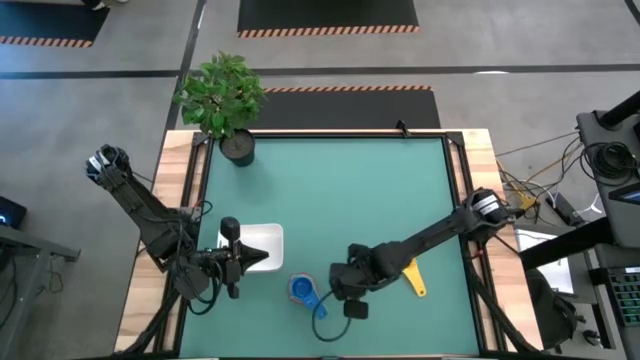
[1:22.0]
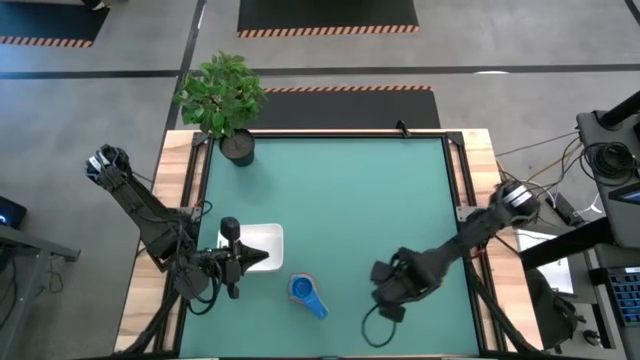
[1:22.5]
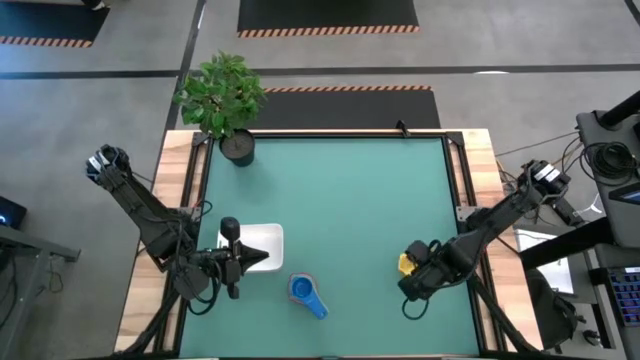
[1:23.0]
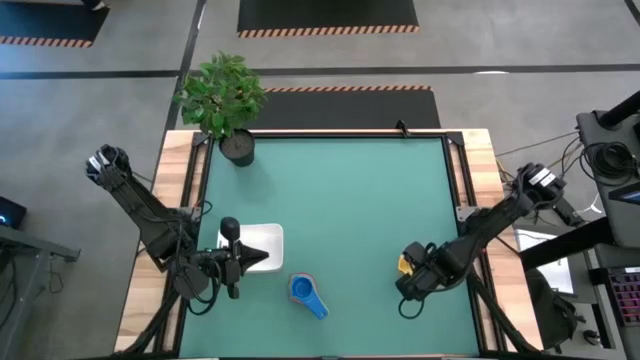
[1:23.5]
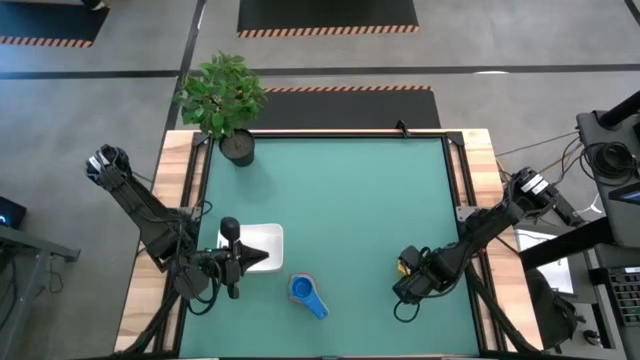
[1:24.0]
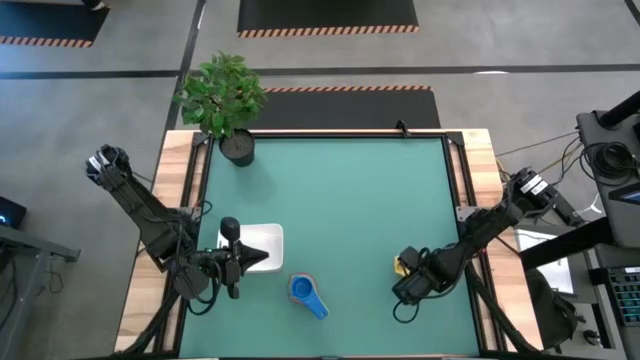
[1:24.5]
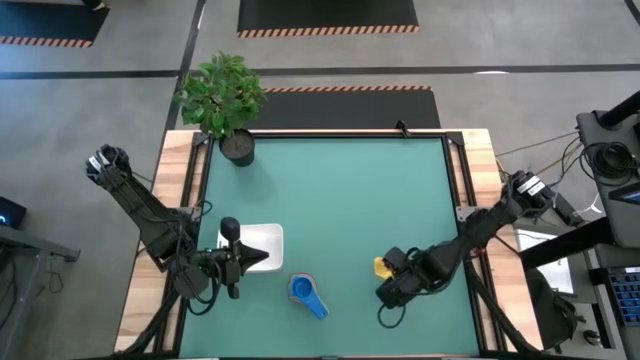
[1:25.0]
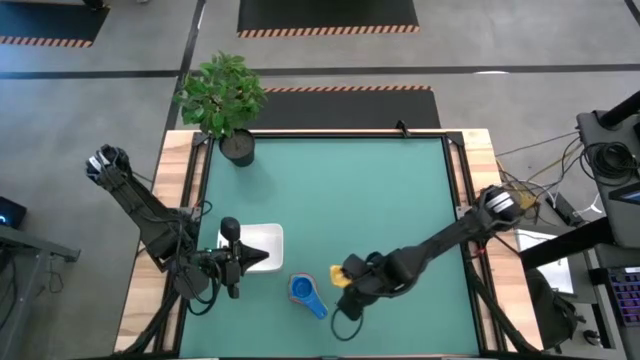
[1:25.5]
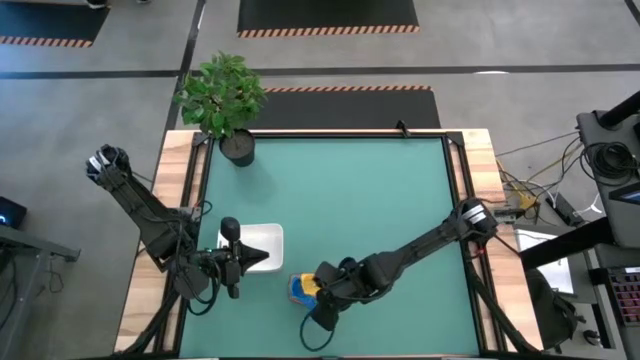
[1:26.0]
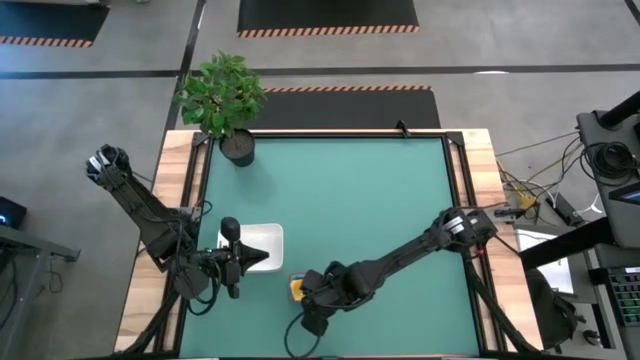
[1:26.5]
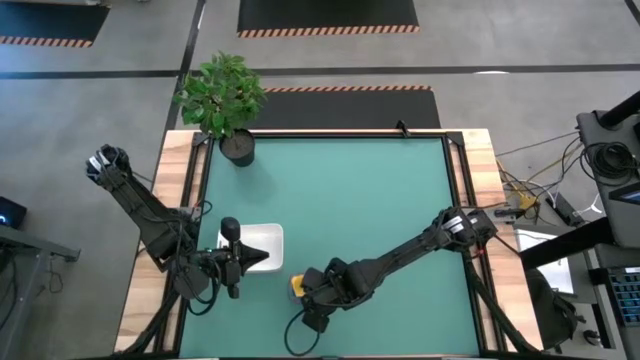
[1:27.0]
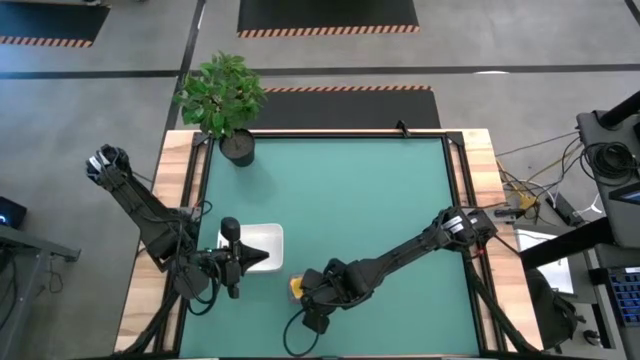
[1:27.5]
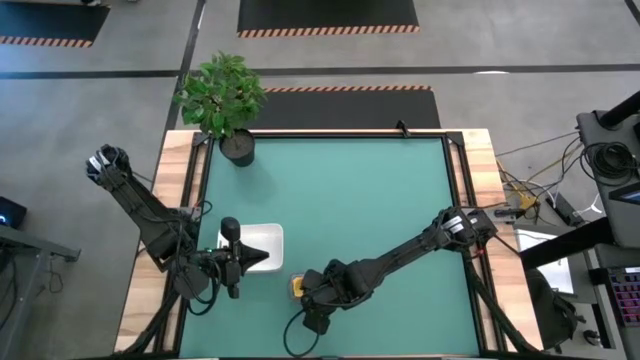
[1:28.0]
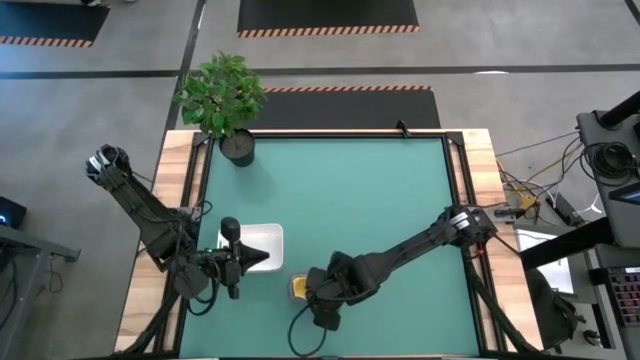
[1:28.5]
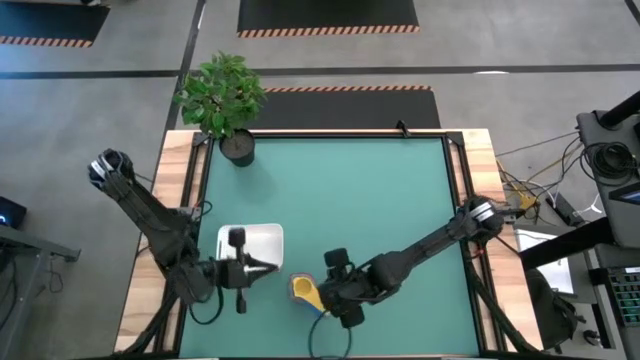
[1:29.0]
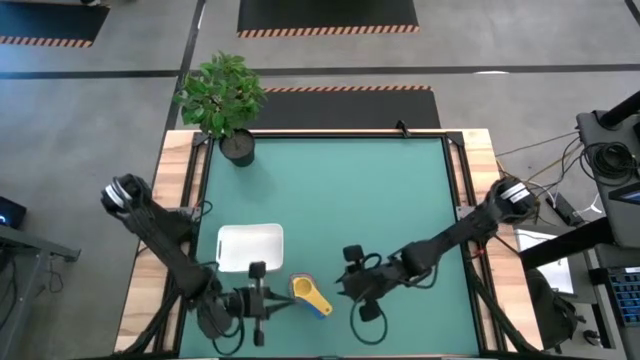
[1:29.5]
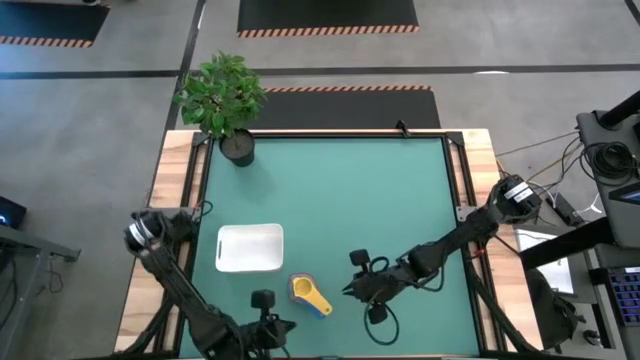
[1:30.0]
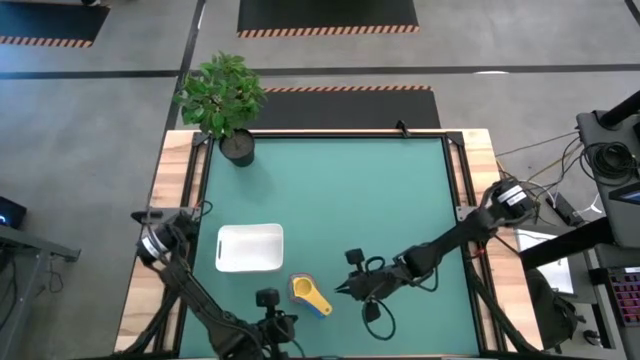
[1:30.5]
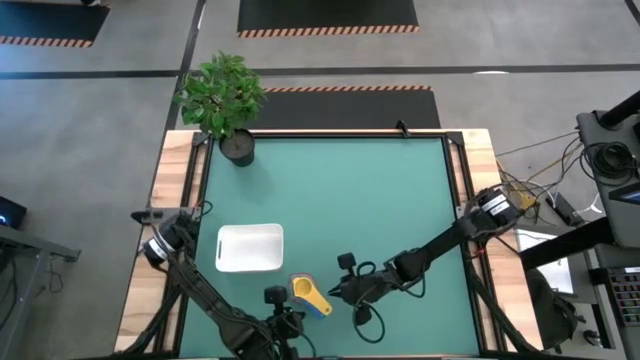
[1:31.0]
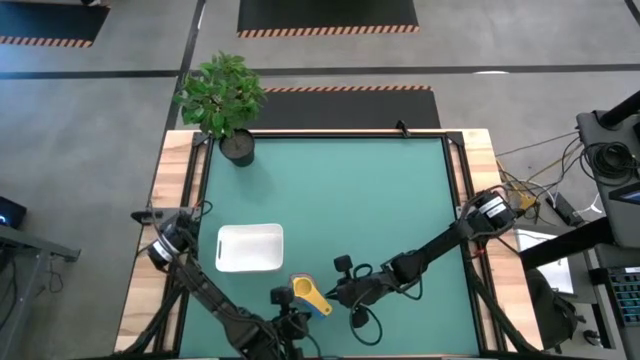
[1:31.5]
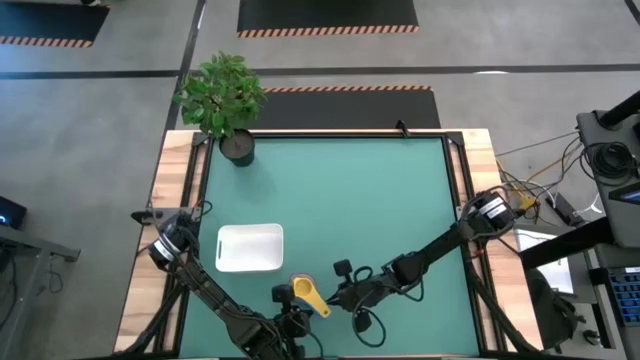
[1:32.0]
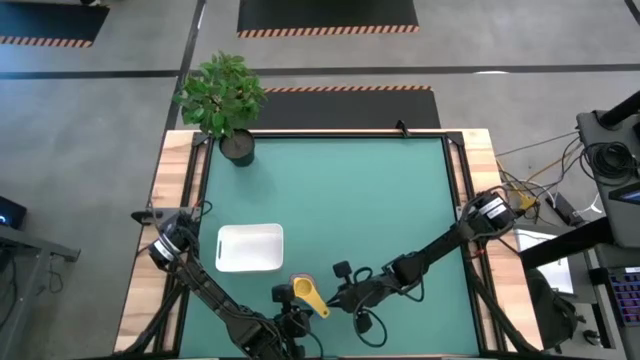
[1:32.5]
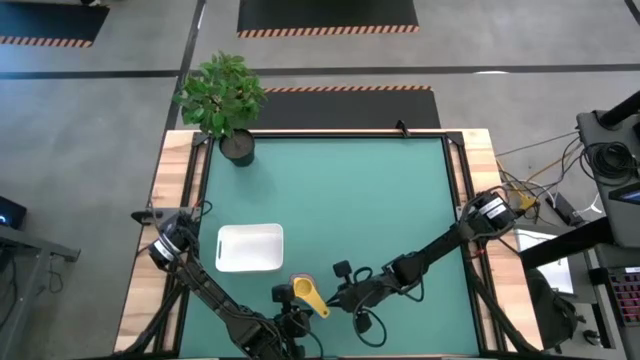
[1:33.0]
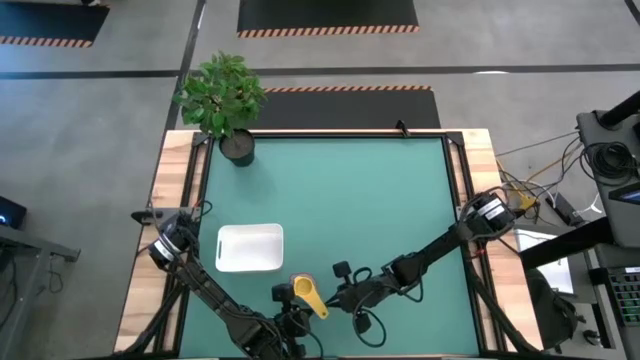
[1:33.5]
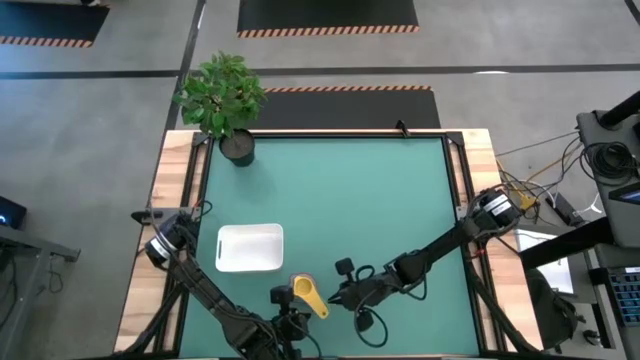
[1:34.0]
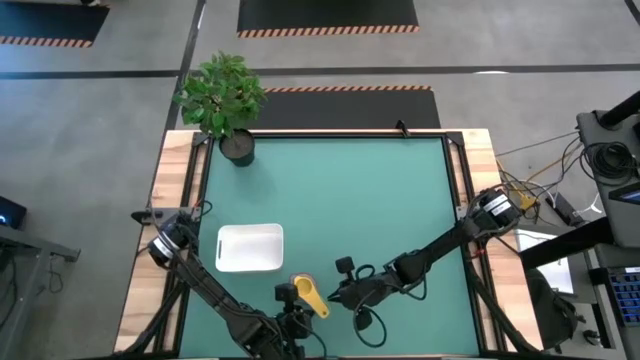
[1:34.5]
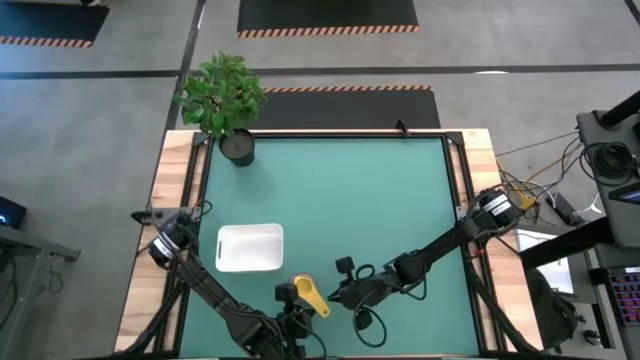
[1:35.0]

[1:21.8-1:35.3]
Task: Nest measuring cups in basket
Stack the yellow measuring cup in the top of the purple measuring cup

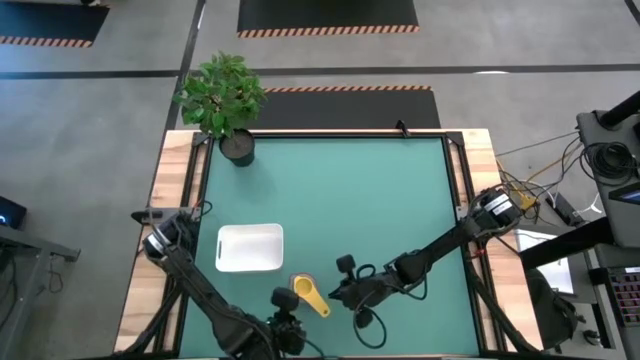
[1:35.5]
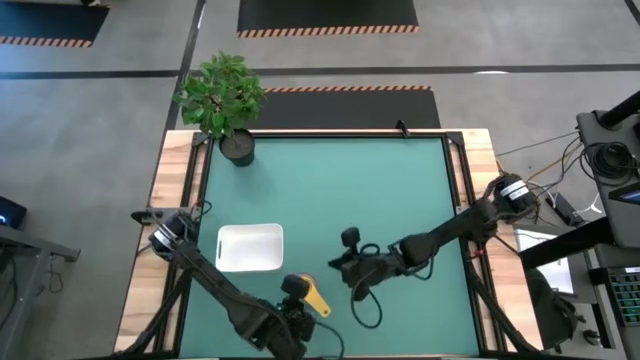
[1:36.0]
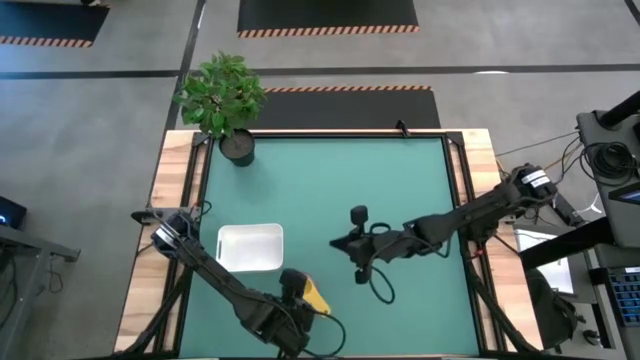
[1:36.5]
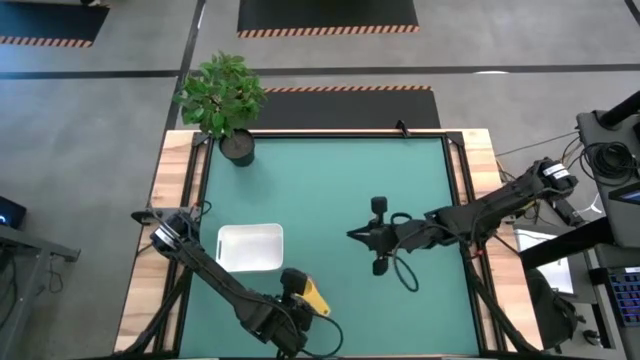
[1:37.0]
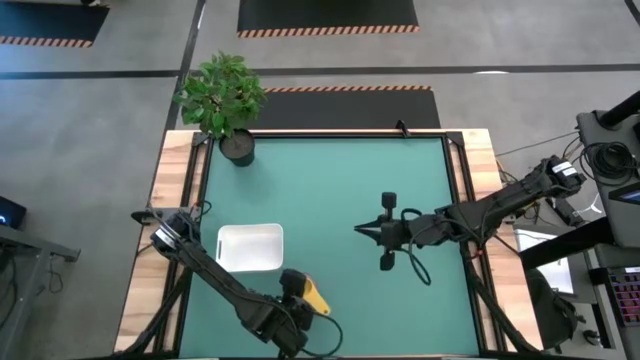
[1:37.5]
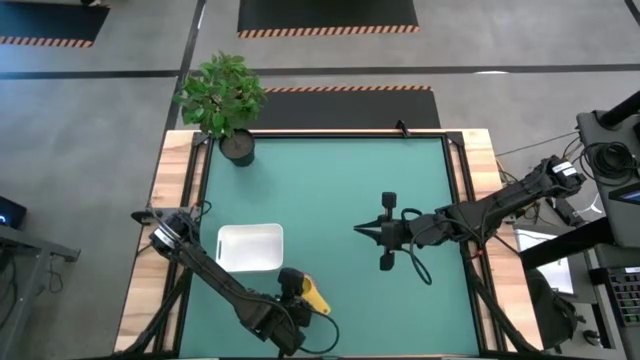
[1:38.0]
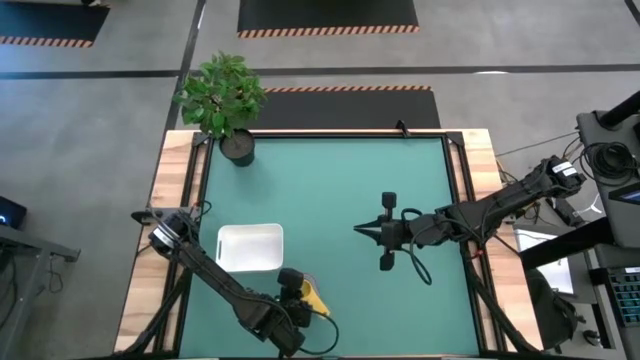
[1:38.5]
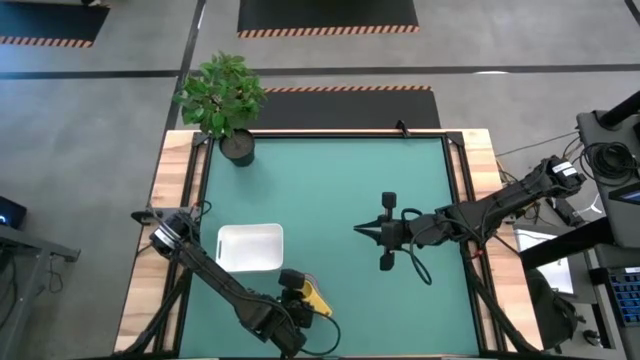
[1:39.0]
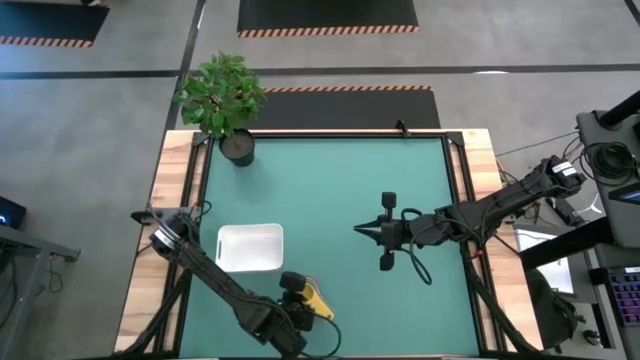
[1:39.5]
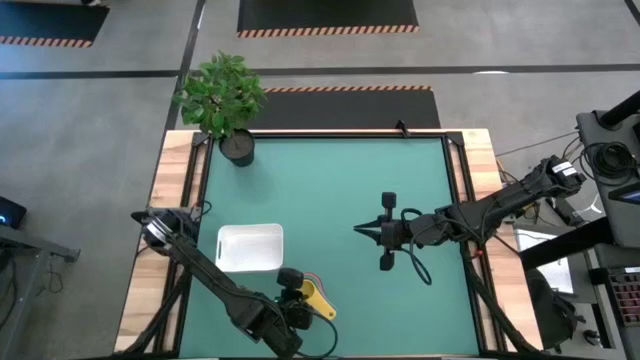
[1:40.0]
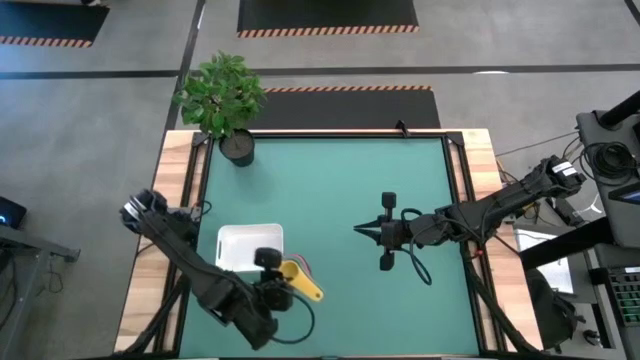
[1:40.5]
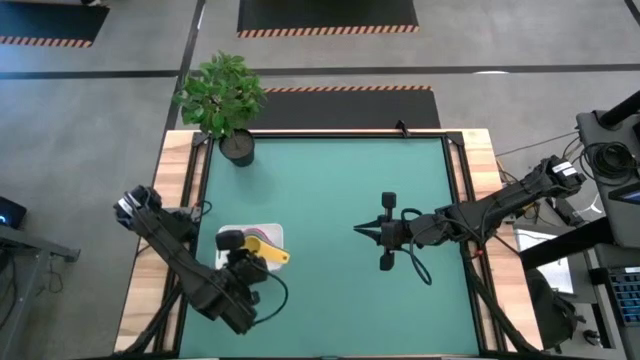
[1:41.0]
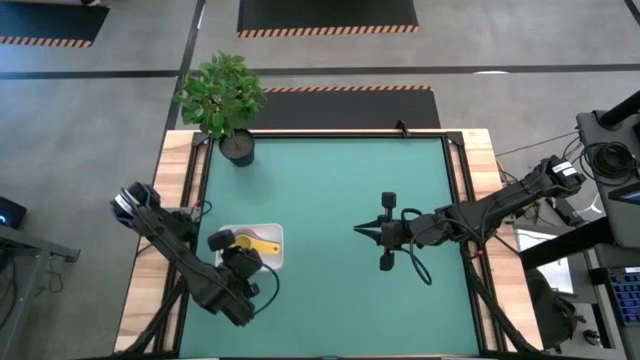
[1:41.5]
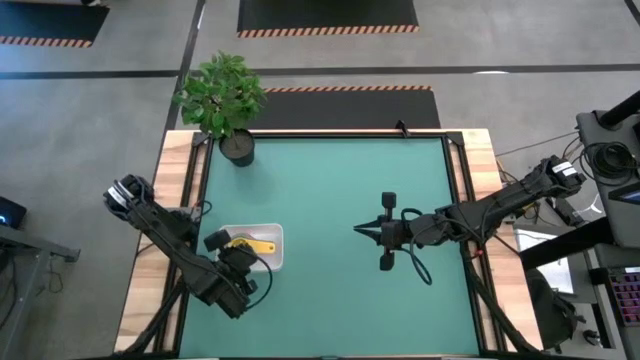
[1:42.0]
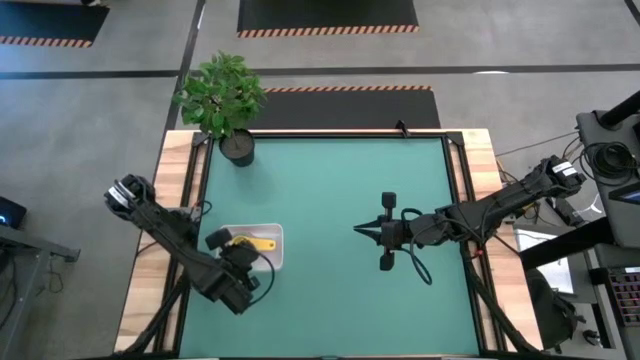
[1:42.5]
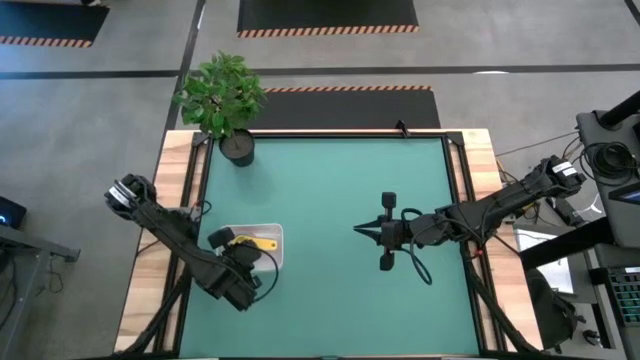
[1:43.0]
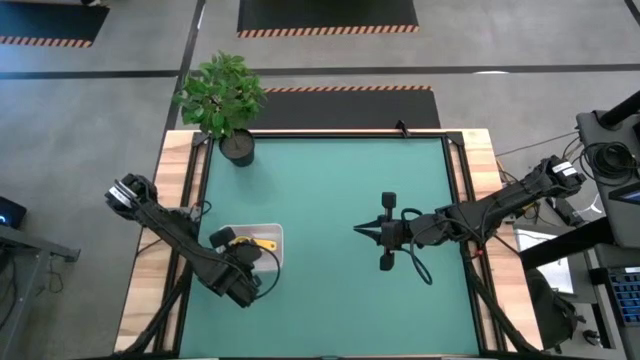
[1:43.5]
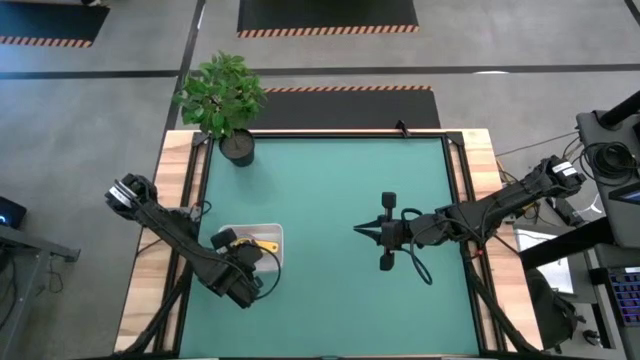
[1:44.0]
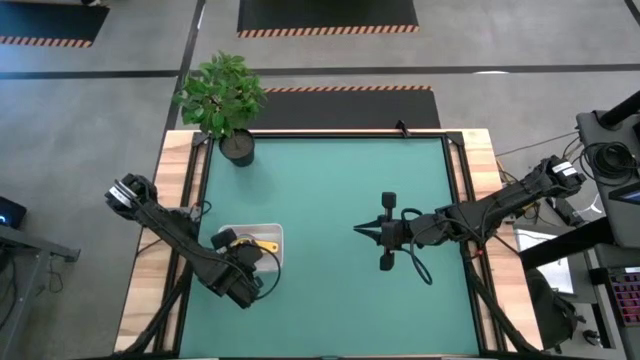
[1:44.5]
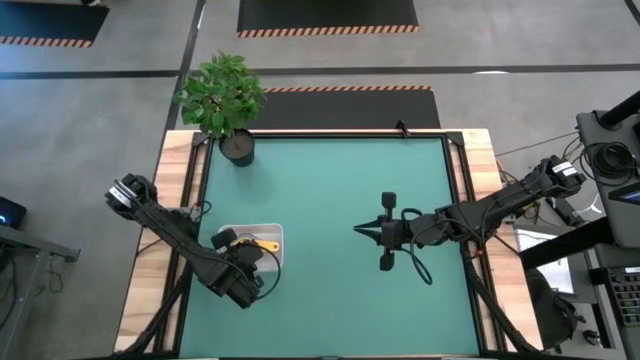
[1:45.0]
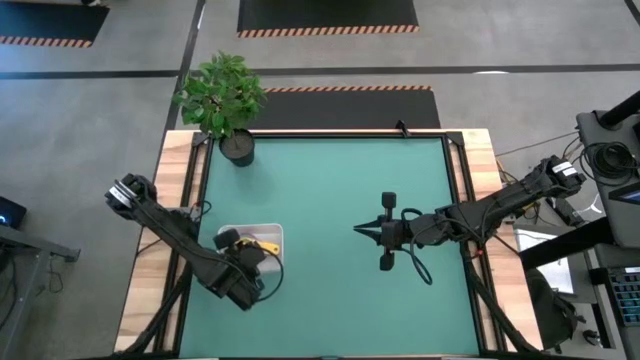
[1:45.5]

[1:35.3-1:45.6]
Put the stacked measuring cups into the white bin
